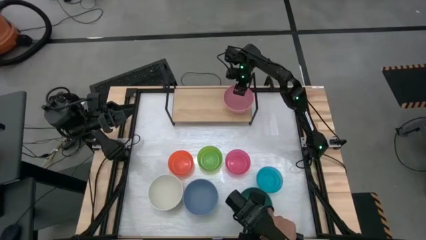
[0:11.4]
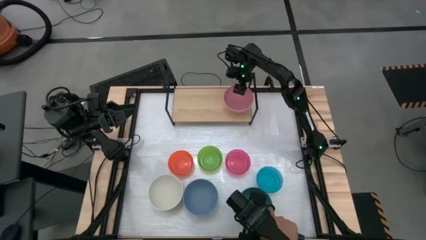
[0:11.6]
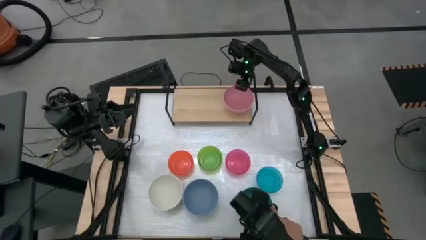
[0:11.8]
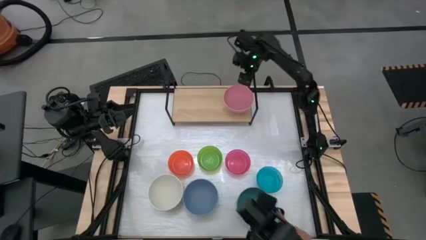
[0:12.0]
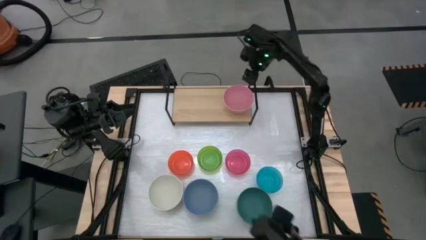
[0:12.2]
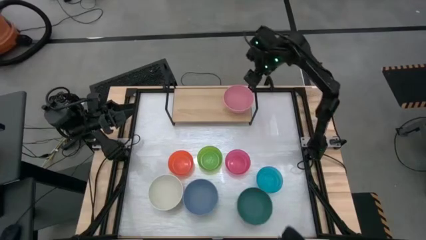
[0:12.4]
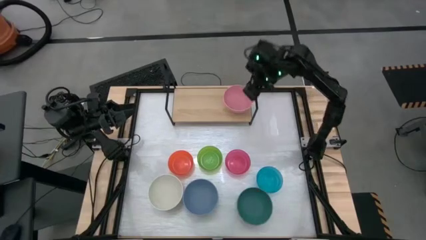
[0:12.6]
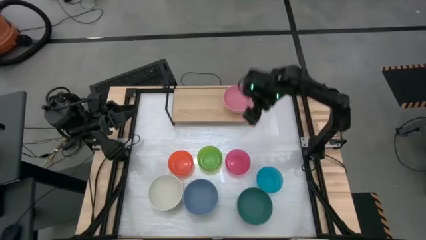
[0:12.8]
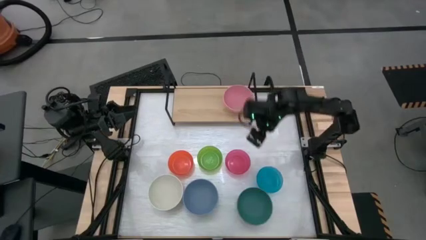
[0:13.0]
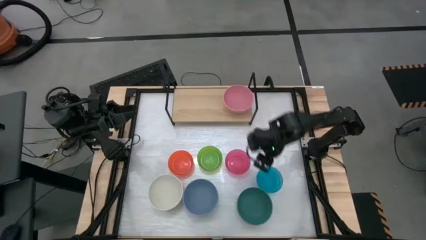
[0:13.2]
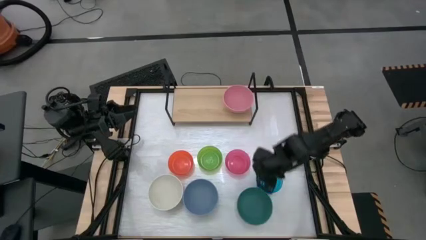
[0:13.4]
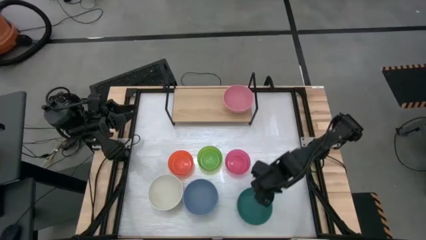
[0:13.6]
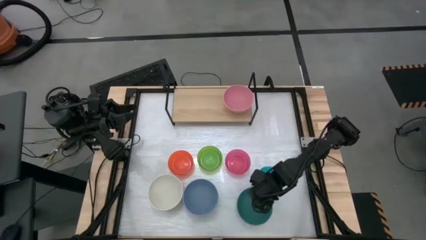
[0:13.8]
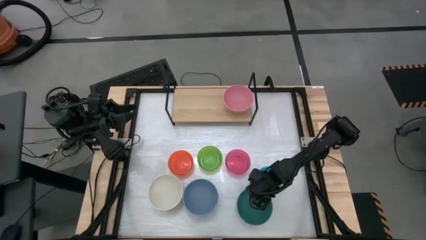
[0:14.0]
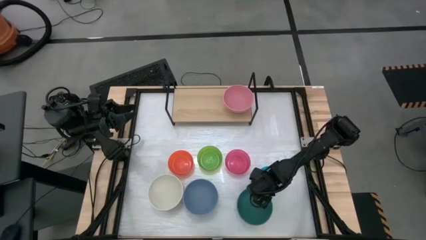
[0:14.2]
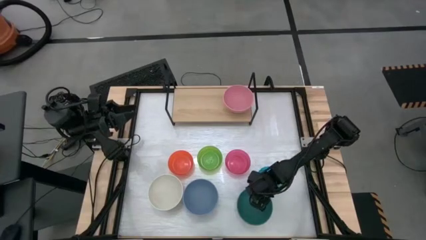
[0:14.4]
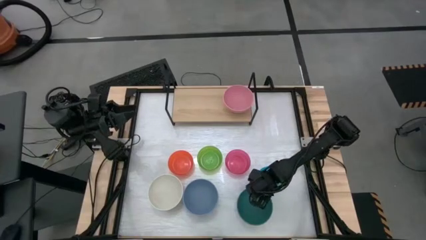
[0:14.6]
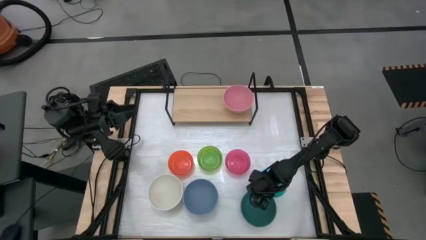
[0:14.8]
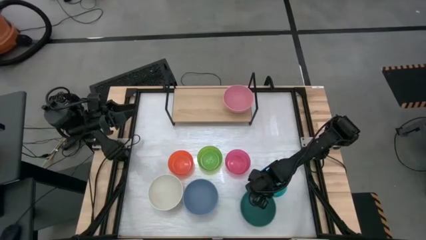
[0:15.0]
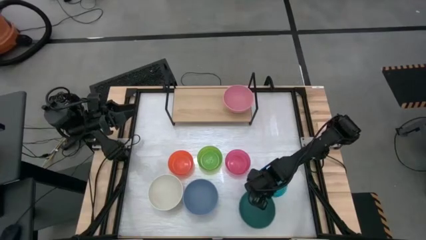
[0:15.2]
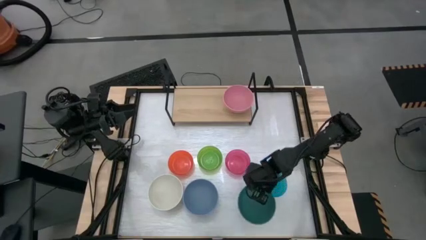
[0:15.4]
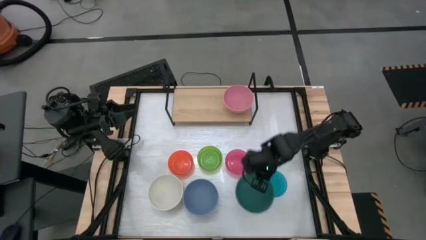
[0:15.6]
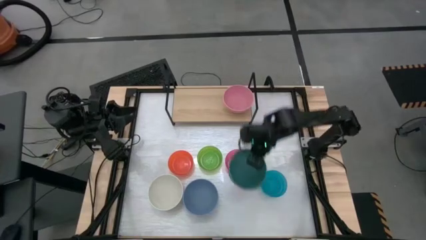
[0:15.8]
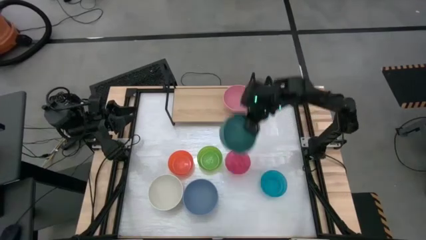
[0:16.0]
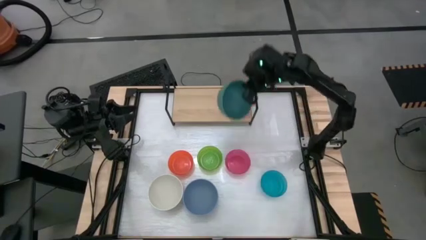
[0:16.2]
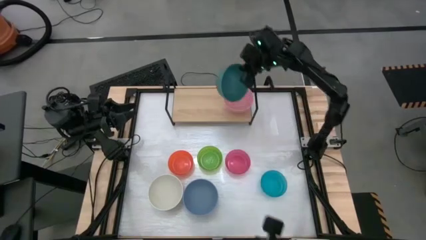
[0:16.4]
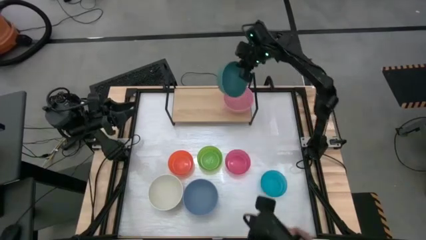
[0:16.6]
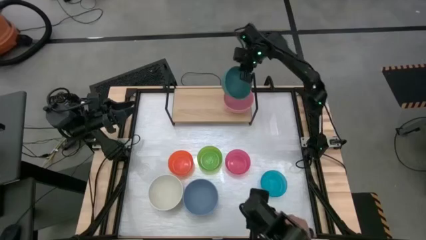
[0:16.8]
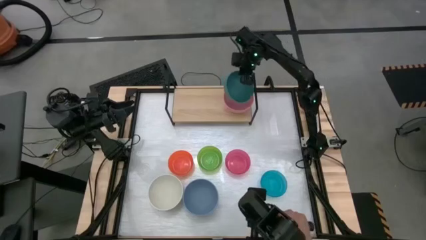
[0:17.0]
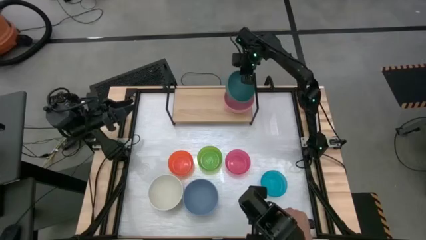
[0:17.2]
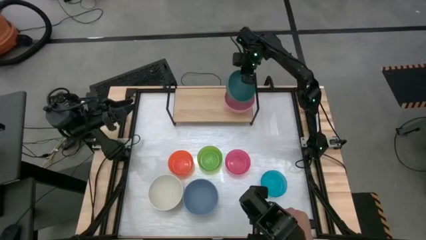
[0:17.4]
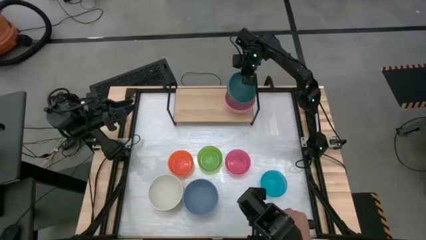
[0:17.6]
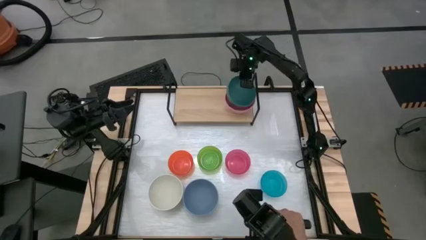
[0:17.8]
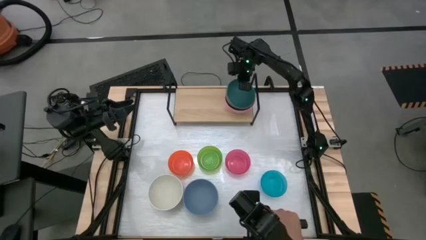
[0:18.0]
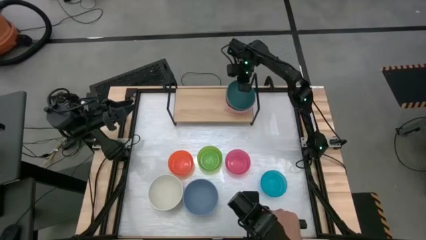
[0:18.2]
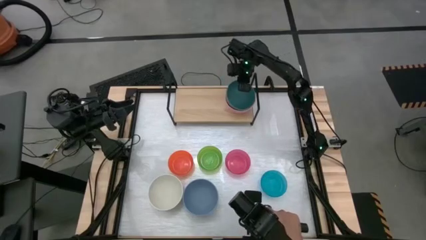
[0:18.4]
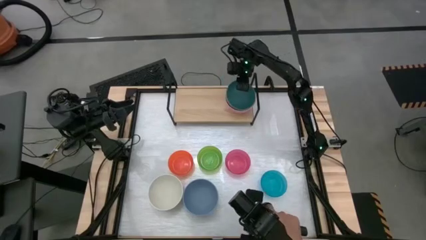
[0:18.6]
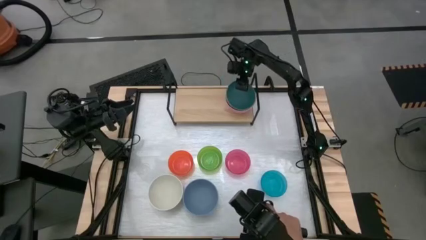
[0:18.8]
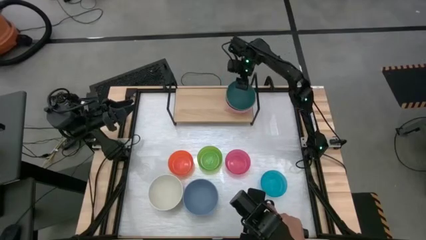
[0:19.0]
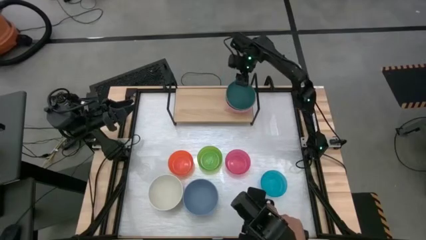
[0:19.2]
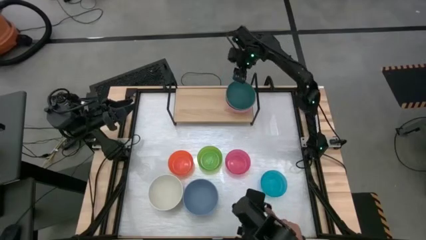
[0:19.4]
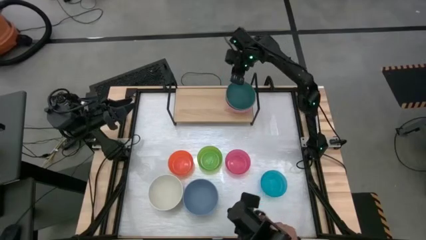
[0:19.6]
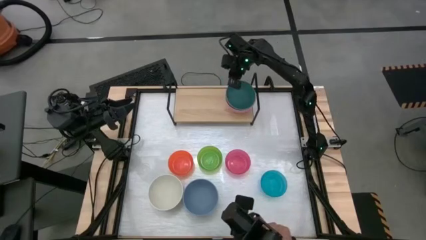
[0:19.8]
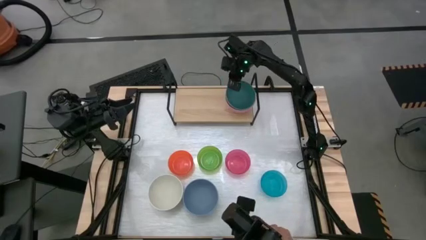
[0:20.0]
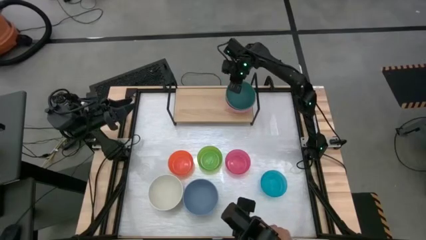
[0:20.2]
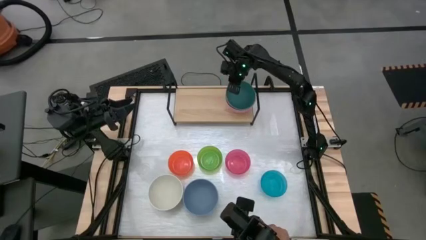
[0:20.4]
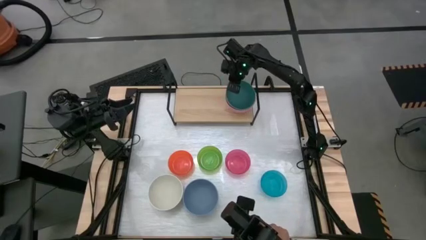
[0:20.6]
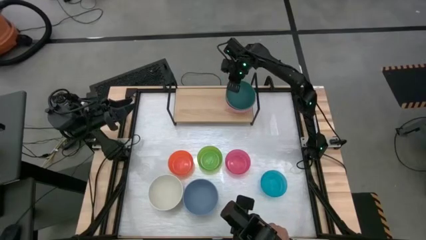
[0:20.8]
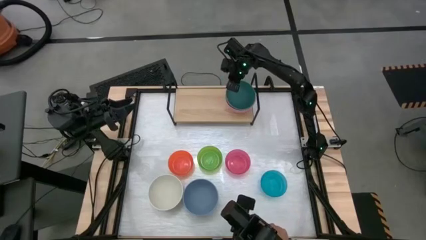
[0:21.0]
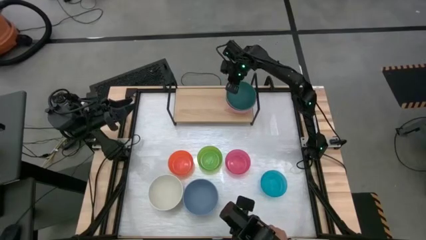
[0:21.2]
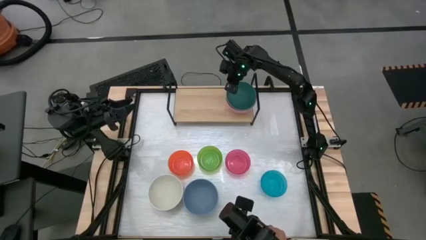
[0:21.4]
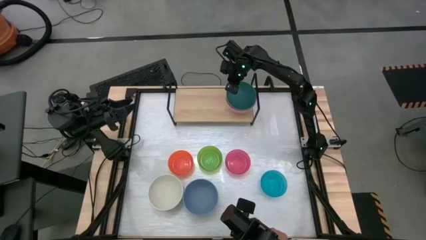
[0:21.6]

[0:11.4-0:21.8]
Task: Place and stack bowls onto a shelf
Stack the dark green bowl into the pink bowl on the shelf

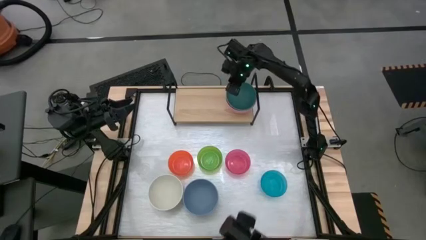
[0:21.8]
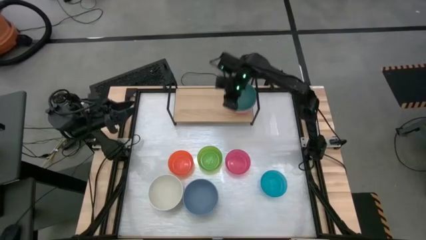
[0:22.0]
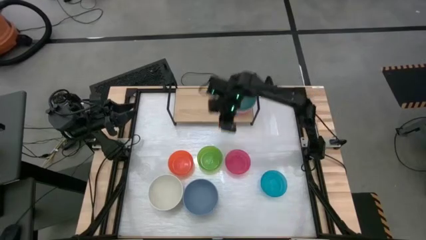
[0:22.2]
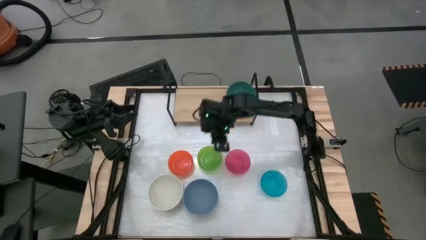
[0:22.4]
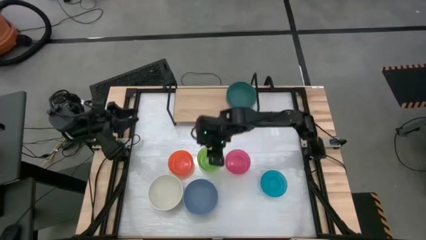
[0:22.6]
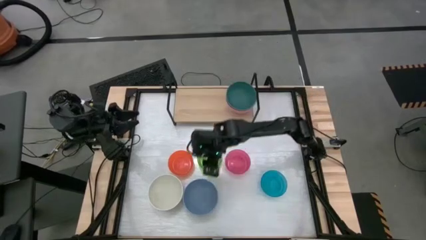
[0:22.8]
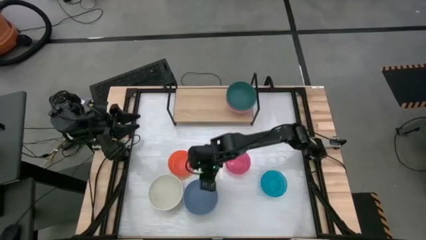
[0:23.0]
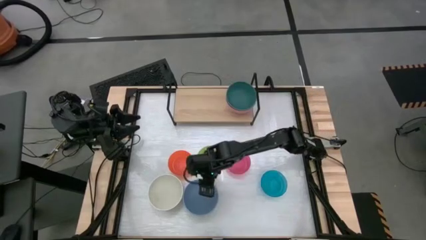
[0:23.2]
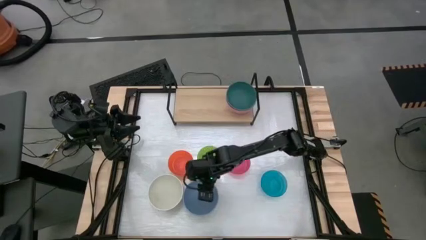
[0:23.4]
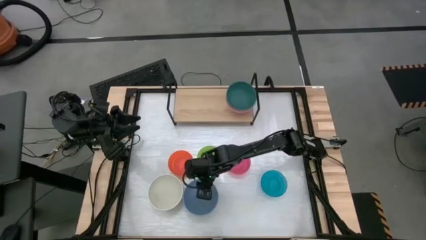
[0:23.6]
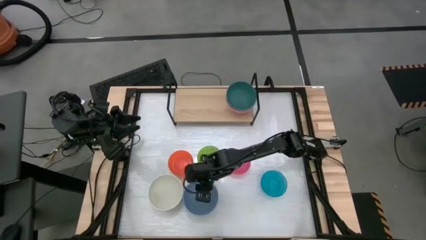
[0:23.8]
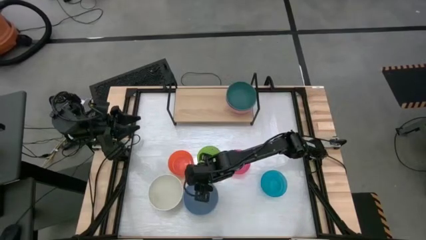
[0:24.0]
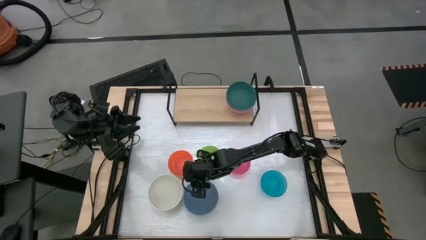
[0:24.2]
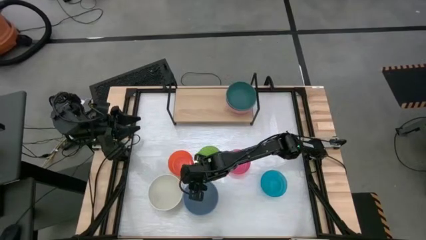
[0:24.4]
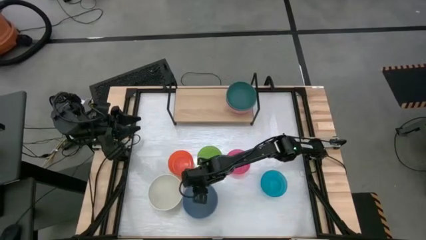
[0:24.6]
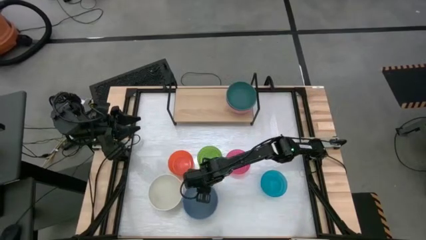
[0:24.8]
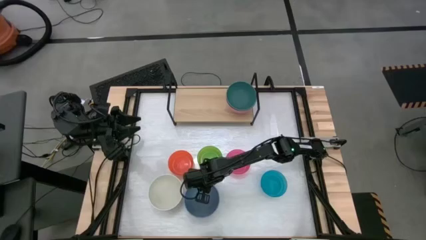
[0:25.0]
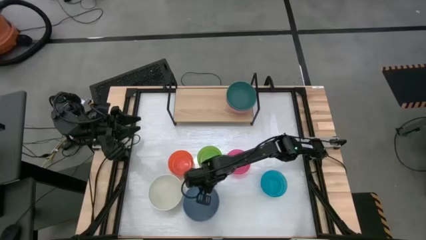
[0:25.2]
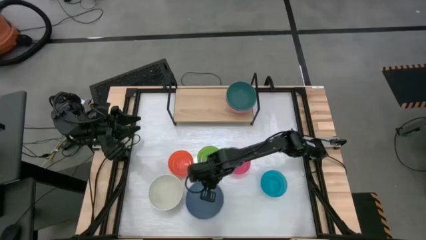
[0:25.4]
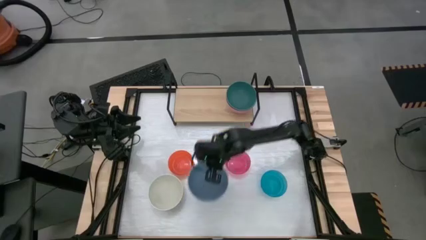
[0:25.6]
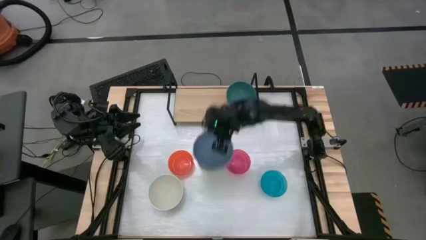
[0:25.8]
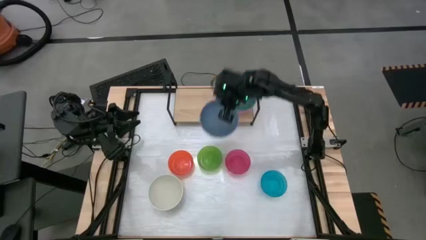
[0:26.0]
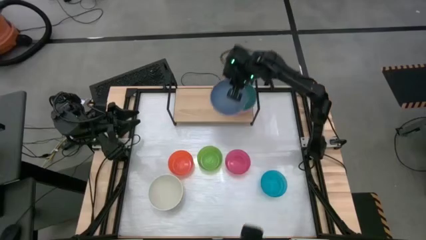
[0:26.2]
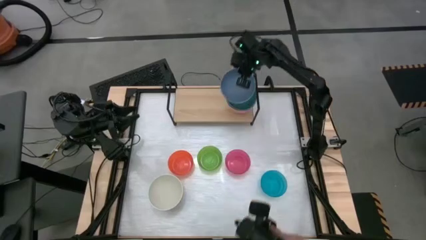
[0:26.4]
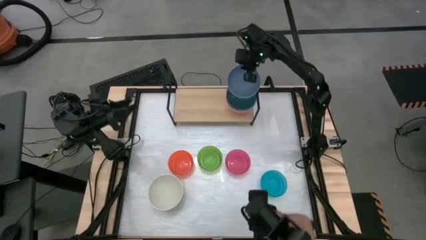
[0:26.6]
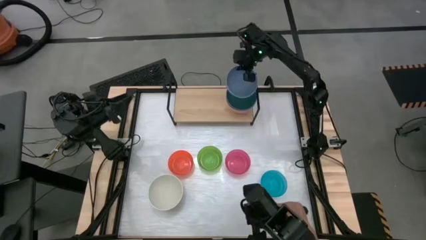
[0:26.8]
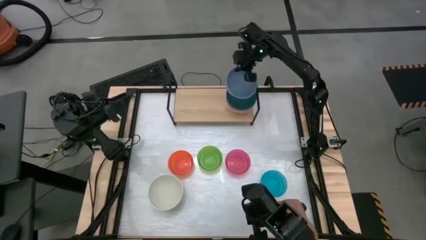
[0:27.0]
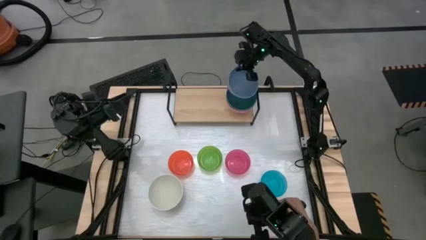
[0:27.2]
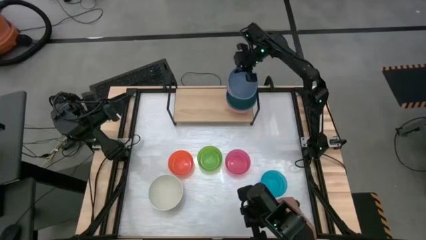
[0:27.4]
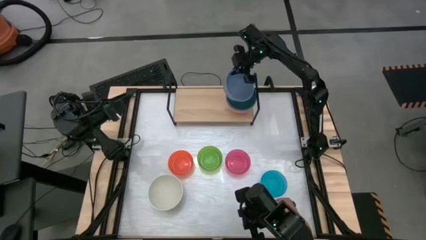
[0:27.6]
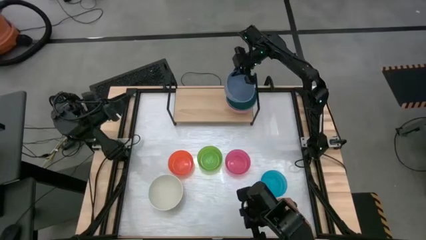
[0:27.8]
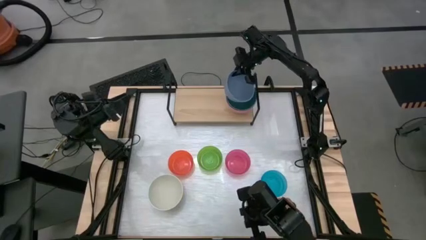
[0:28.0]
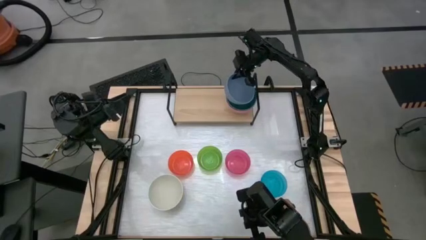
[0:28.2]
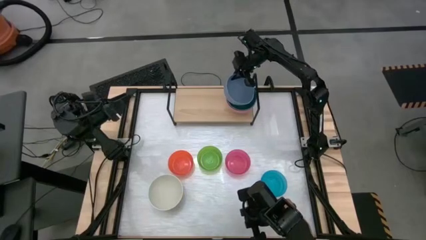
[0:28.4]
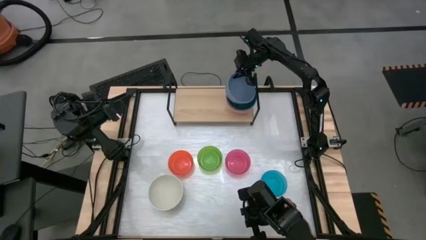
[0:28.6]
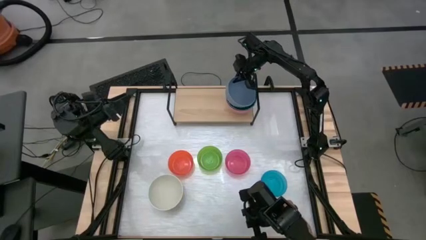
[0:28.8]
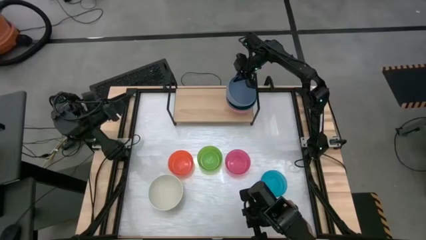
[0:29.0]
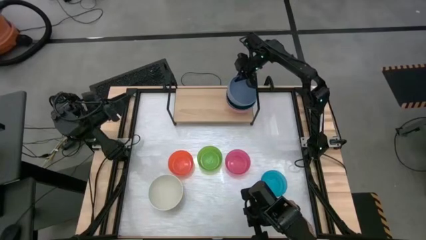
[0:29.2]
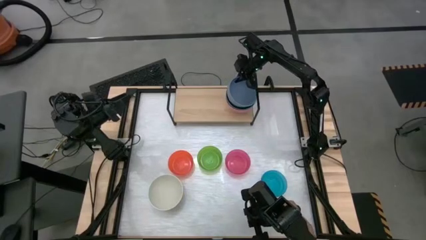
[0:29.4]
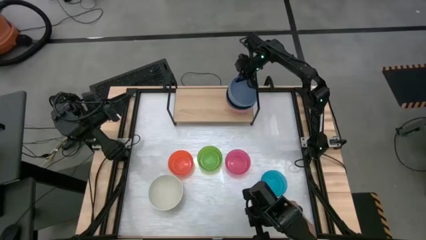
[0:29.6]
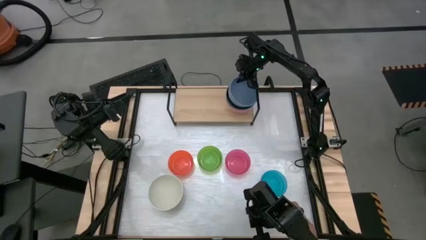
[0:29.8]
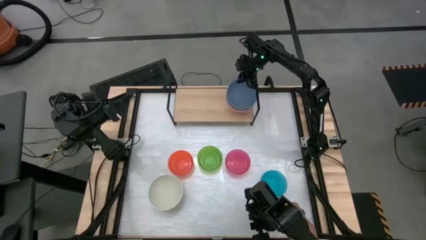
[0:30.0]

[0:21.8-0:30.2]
Stack the dark blue bowl into the dark green bowl on the shelf
